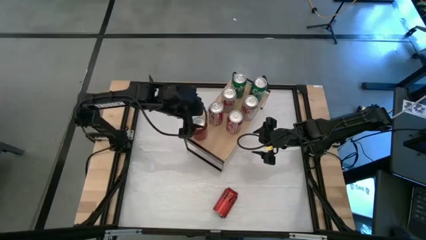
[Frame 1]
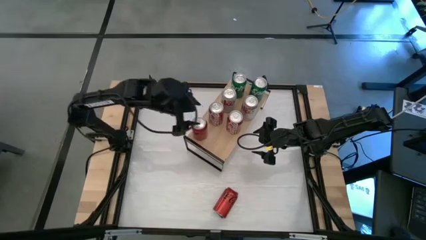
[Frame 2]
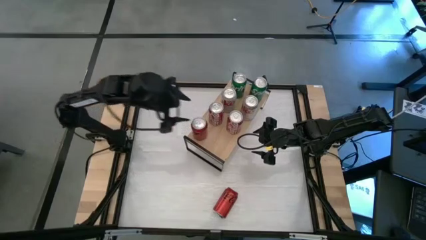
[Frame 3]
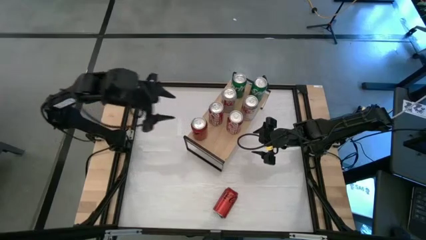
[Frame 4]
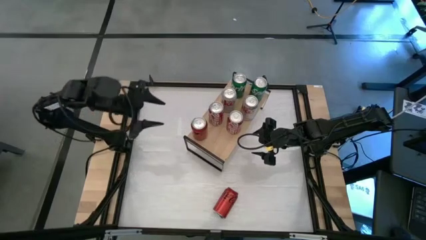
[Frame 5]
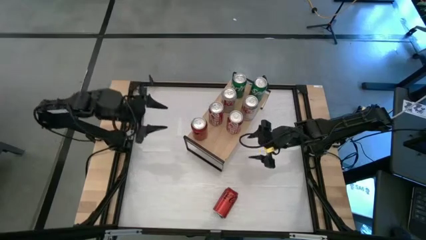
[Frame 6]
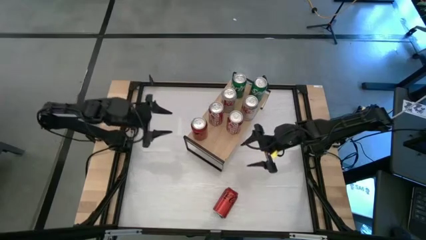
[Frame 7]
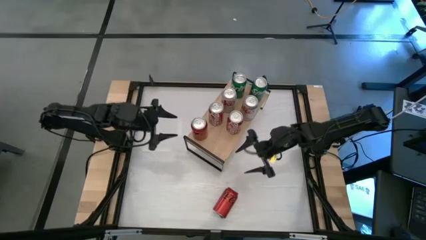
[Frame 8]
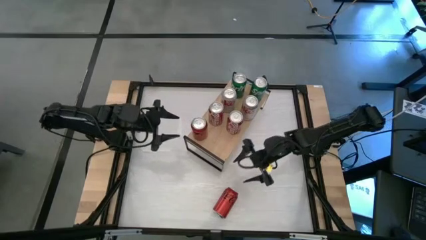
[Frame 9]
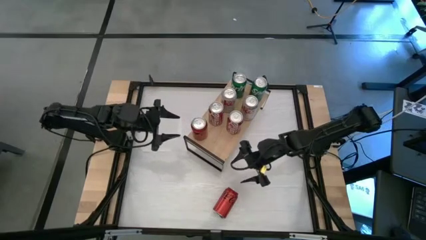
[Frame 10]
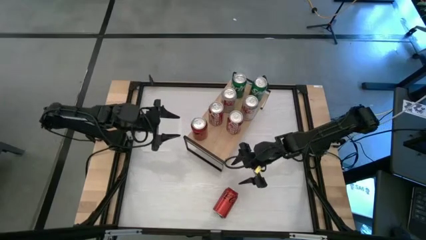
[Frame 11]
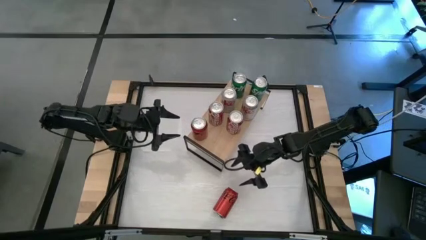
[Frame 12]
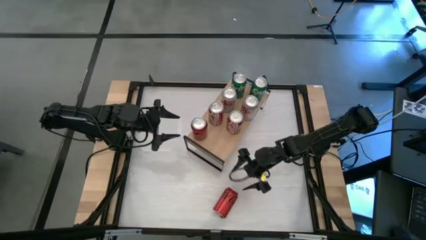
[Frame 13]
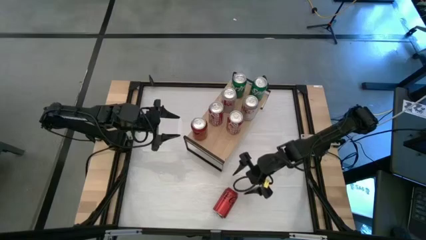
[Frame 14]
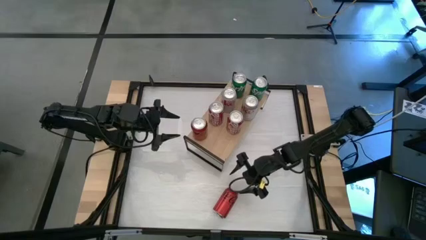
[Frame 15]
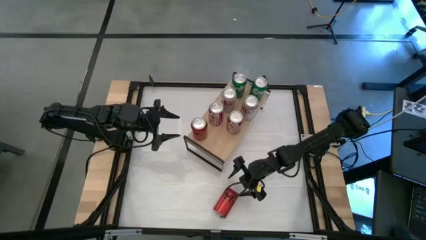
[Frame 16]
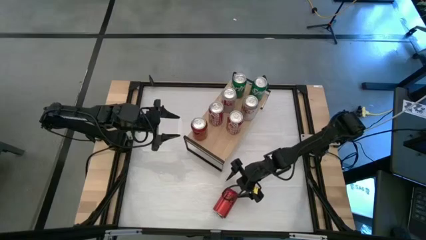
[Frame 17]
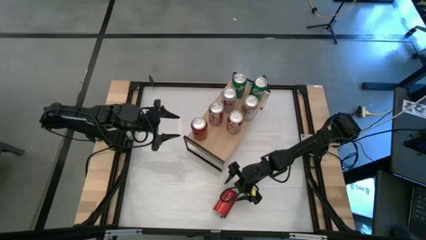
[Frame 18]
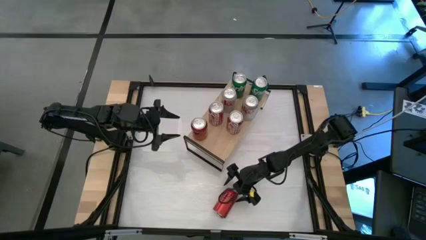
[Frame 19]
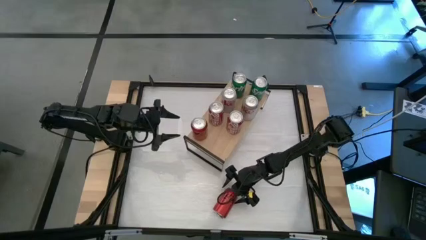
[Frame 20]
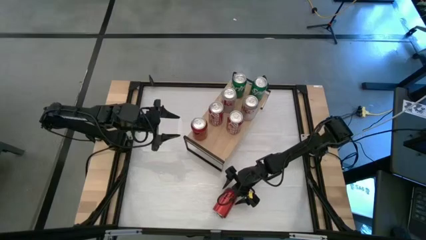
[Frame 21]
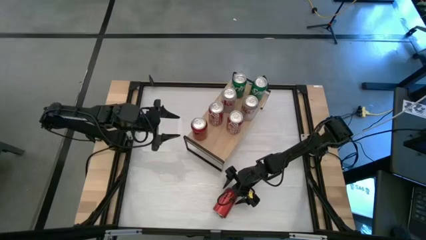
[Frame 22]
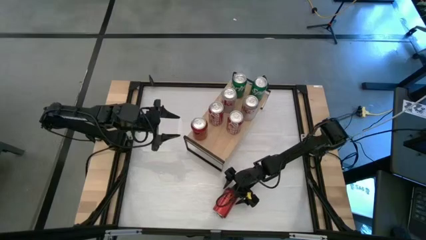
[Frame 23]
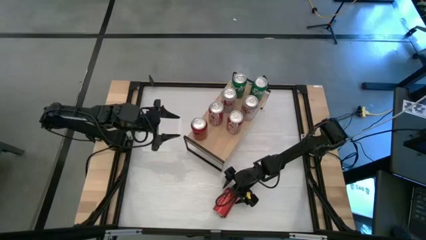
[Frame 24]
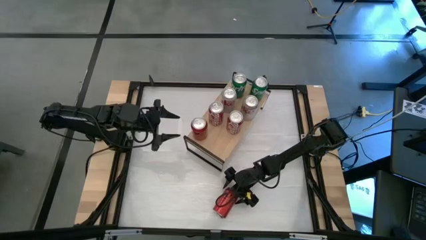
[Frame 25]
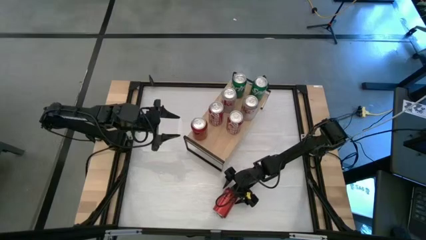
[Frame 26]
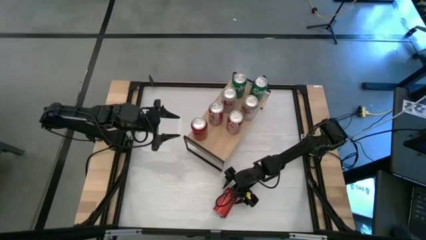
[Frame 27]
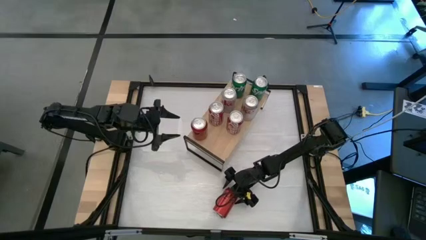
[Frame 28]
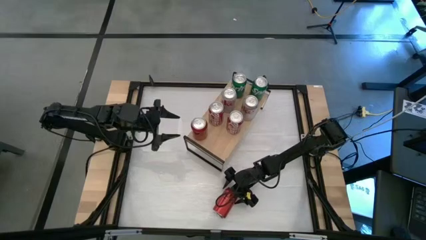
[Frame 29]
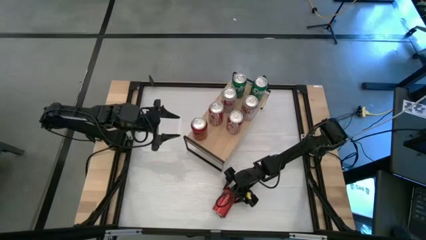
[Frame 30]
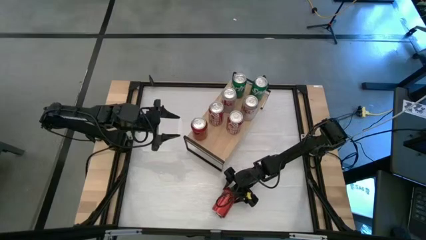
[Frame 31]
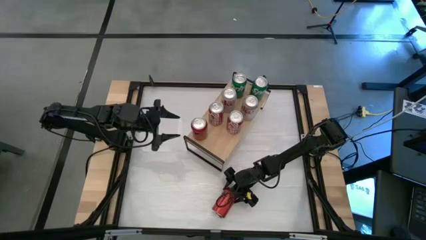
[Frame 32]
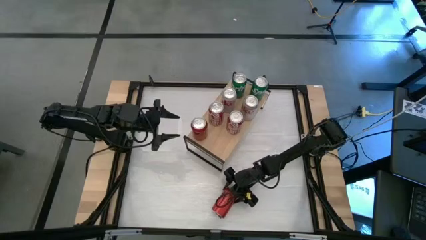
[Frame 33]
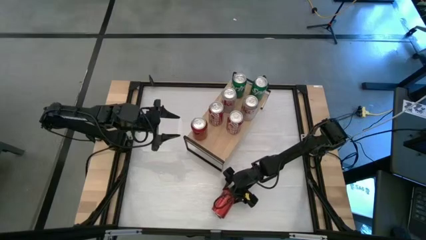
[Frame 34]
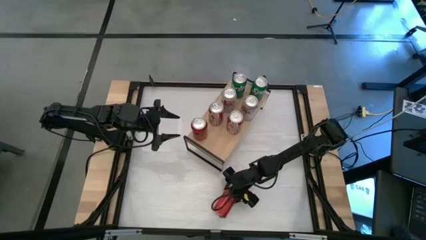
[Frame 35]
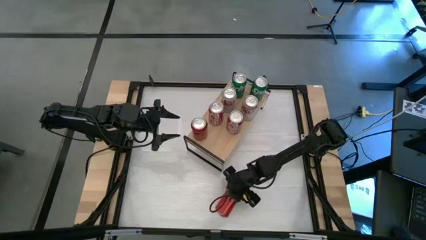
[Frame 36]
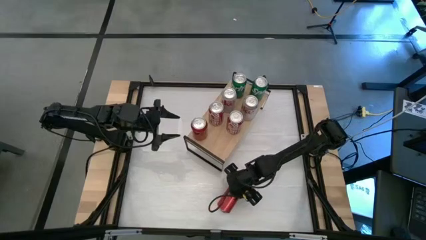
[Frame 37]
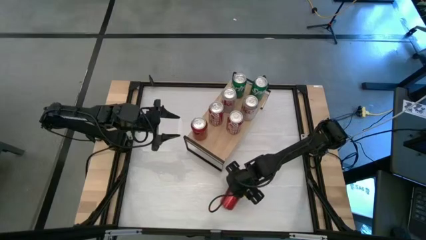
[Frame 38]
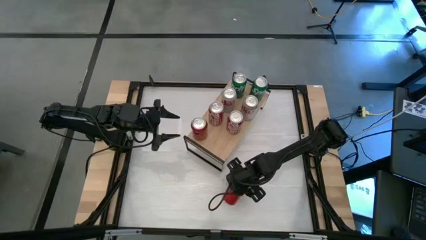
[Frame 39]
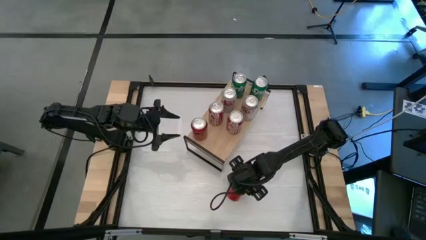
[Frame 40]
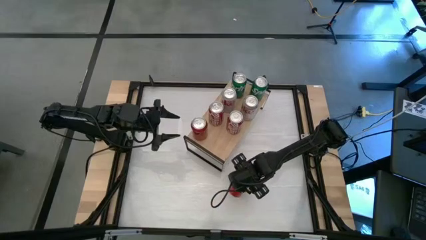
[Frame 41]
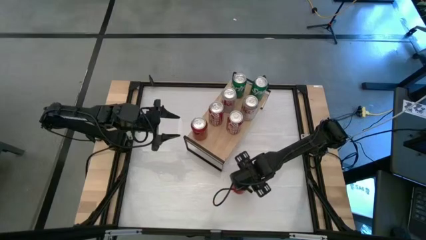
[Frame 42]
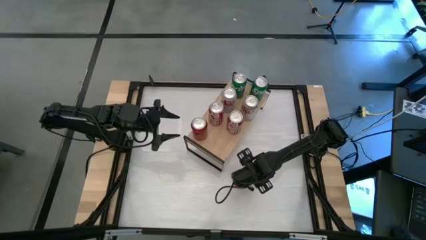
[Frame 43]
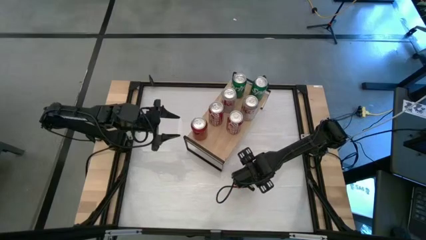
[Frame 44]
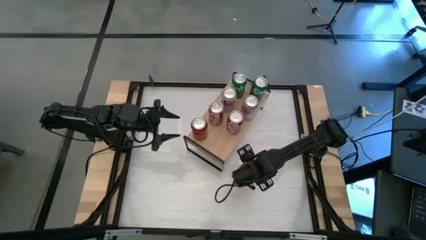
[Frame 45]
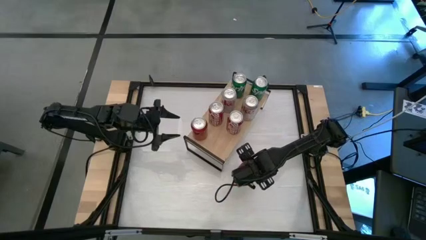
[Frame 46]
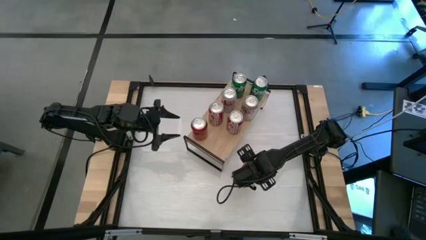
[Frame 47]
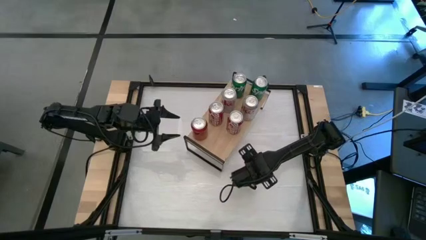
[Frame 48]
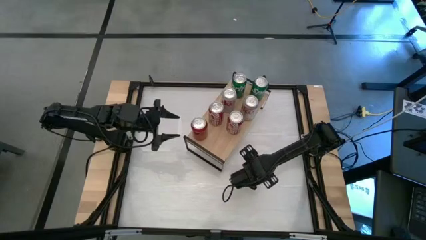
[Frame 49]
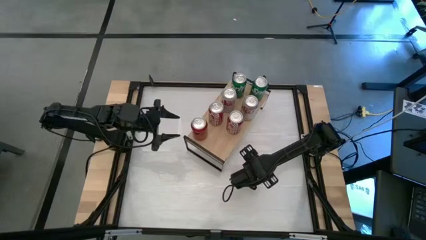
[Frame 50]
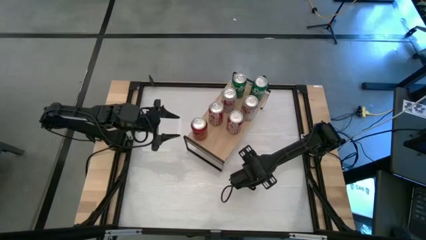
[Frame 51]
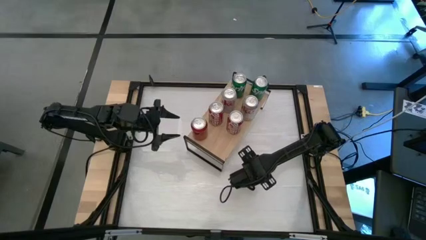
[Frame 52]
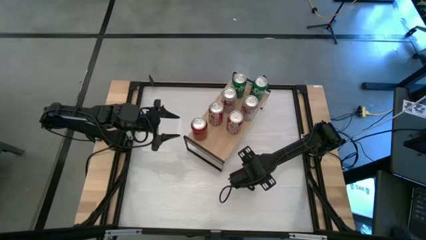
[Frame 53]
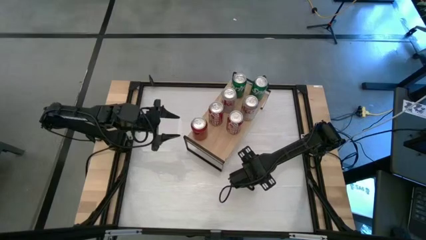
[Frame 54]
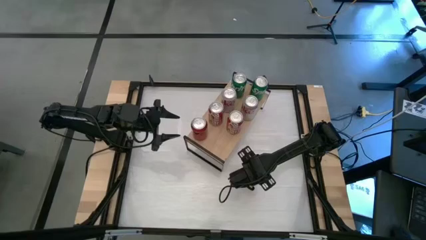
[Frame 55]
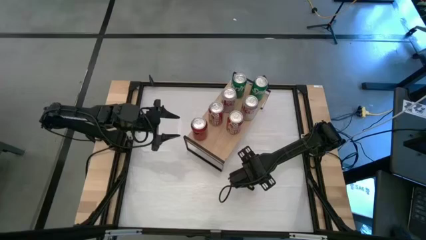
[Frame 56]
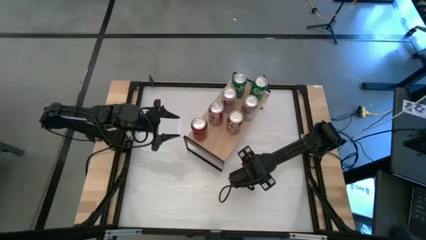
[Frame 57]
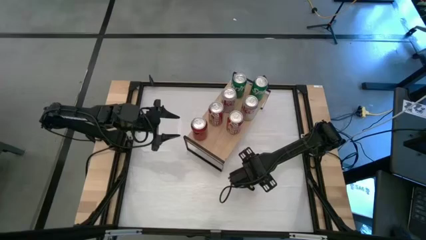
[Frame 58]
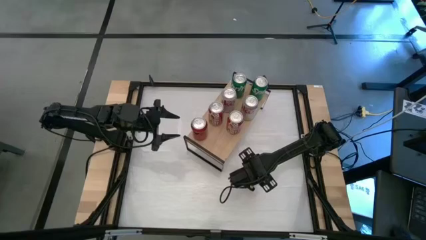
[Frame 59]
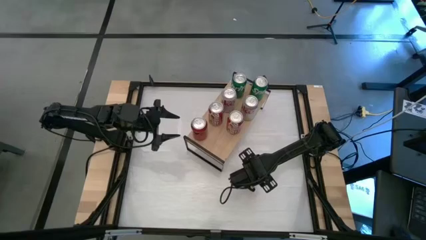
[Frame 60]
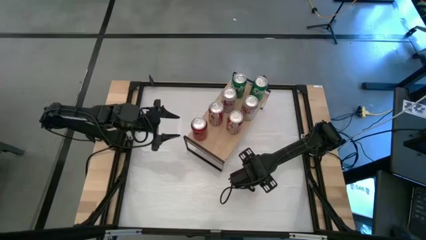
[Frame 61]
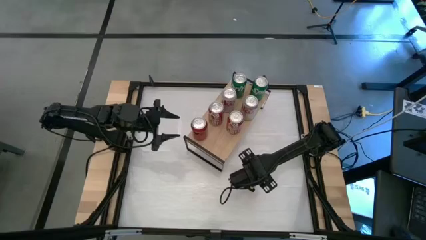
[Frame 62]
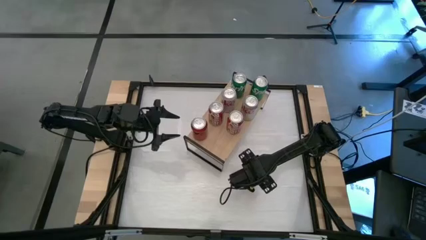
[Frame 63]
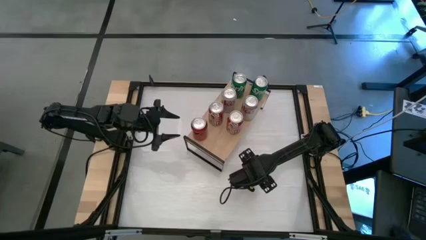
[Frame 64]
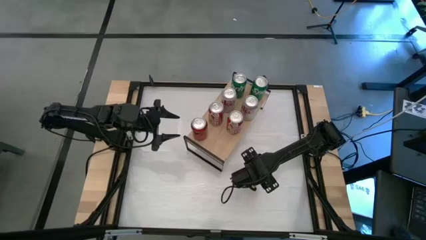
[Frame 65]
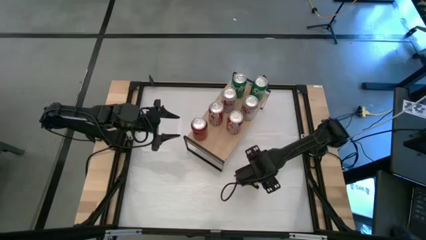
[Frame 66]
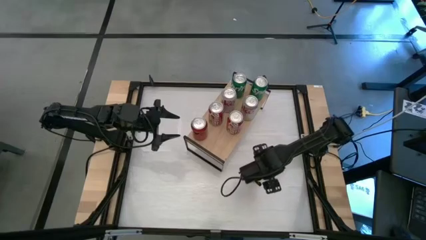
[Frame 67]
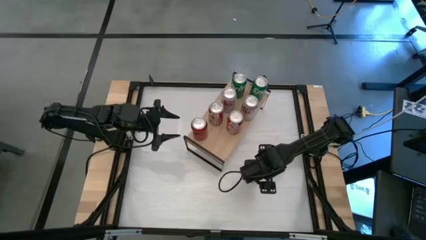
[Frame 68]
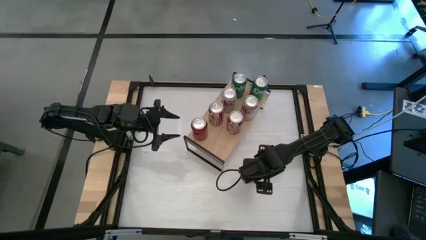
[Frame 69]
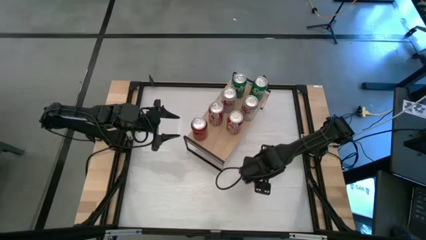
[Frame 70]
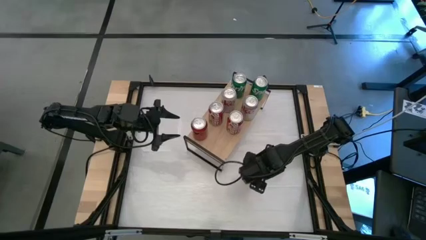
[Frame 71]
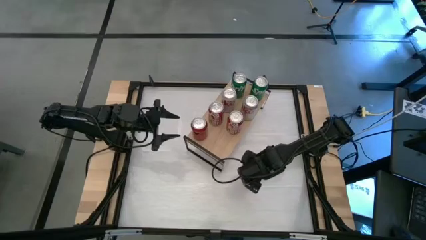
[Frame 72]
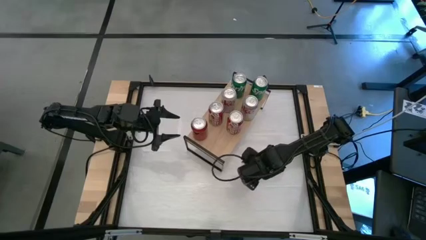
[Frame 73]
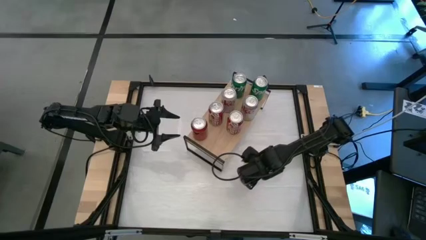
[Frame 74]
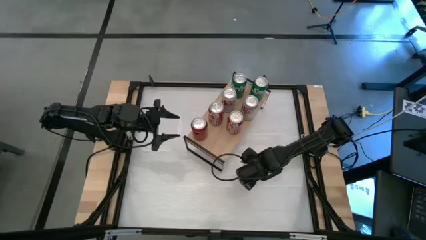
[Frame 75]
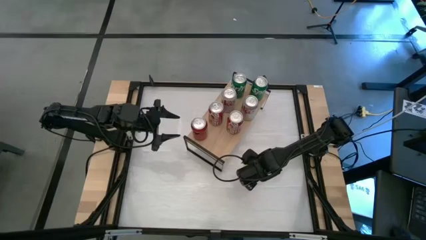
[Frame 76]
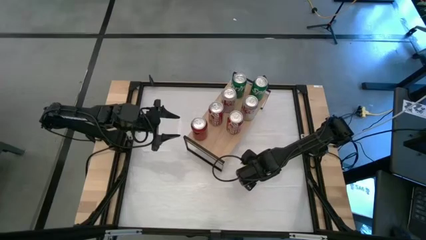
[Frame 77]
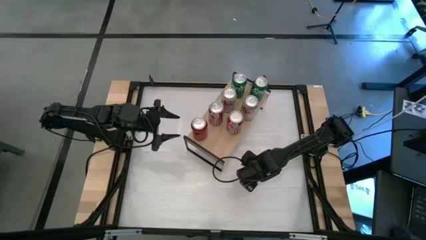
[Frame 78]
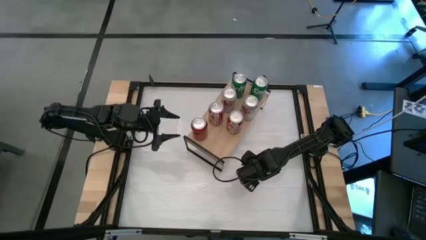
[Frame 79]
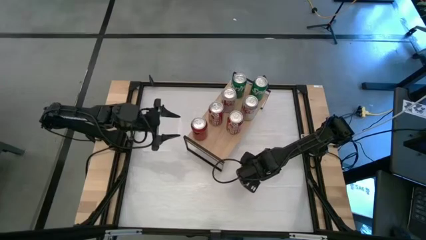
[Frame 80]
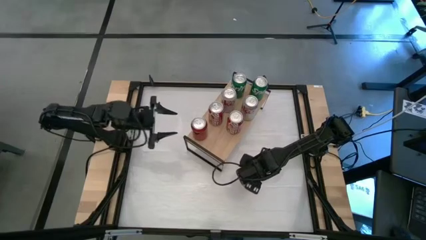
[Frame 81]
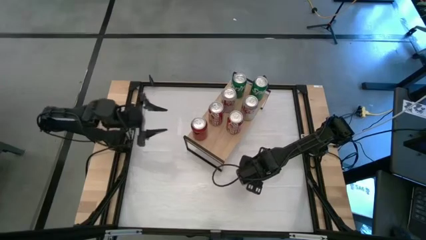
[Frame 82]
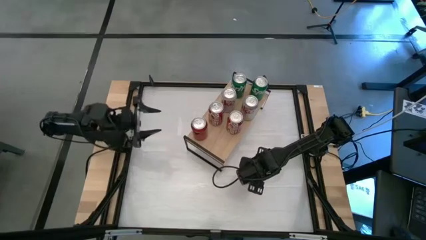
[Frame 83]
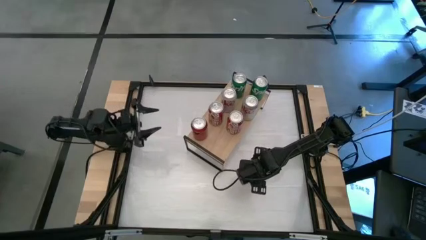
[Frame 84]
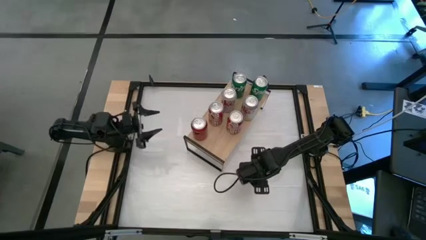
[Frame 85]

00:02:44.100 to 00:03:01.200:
Task: Place canned beverage on shelf
Put the red-black soda can on the shelf aligned with the other red-black soda can
